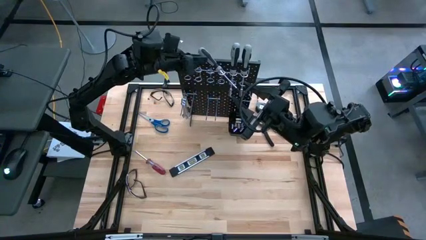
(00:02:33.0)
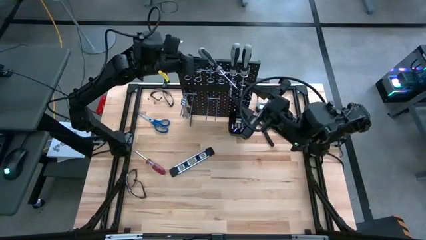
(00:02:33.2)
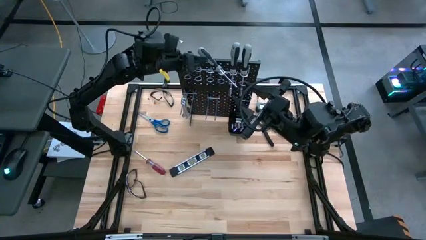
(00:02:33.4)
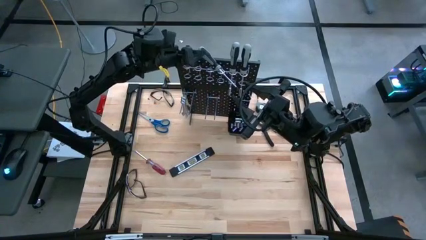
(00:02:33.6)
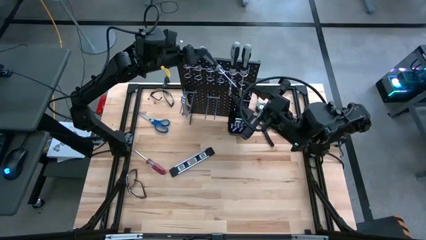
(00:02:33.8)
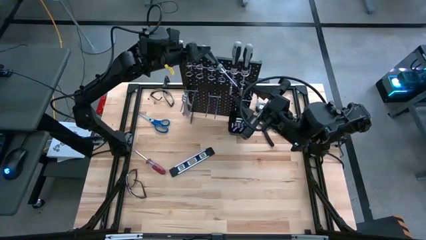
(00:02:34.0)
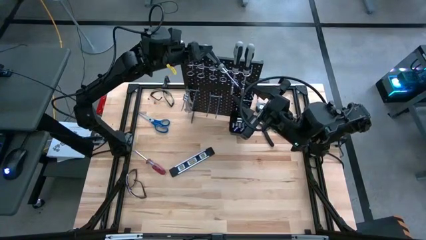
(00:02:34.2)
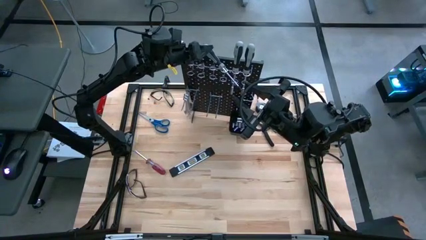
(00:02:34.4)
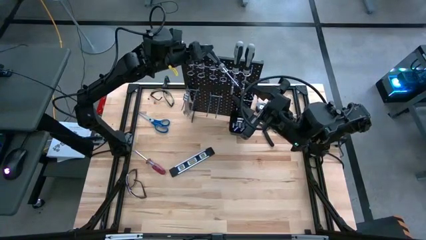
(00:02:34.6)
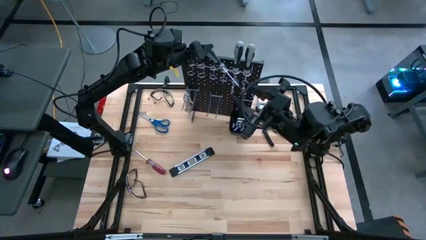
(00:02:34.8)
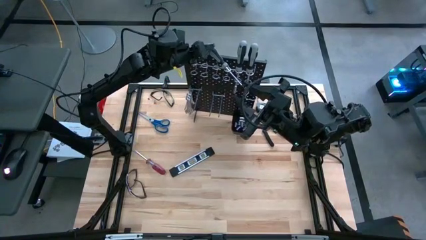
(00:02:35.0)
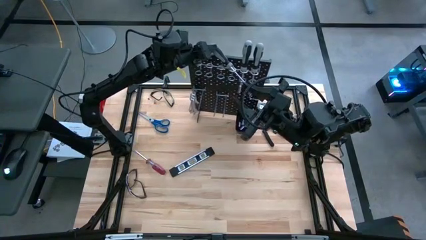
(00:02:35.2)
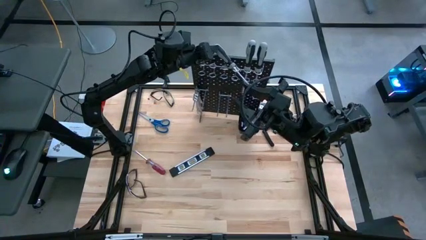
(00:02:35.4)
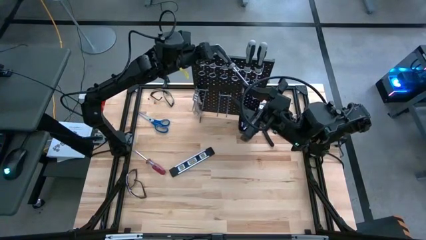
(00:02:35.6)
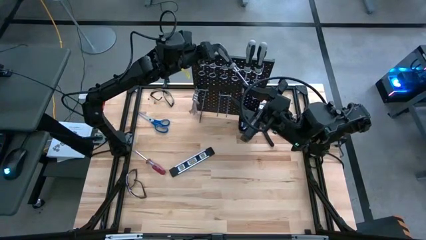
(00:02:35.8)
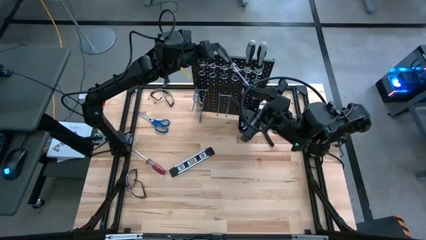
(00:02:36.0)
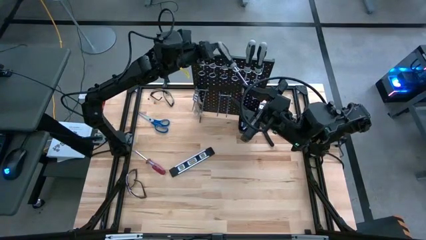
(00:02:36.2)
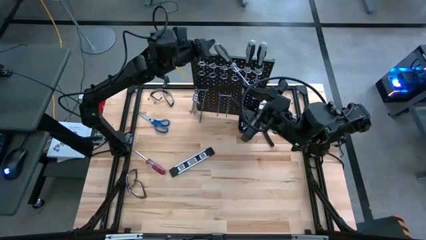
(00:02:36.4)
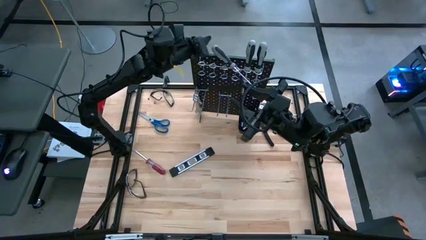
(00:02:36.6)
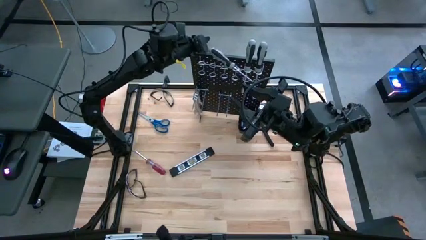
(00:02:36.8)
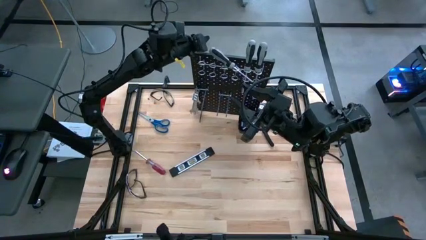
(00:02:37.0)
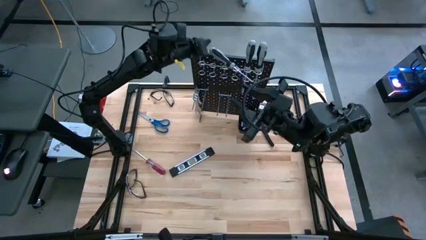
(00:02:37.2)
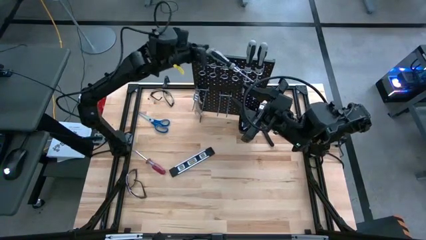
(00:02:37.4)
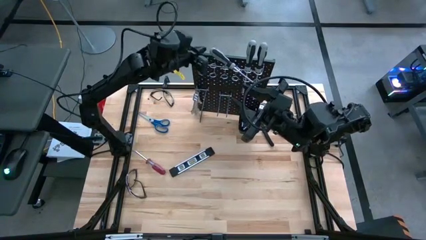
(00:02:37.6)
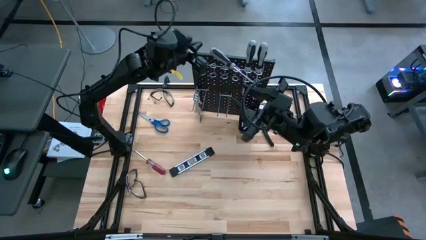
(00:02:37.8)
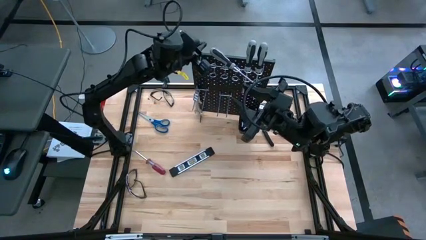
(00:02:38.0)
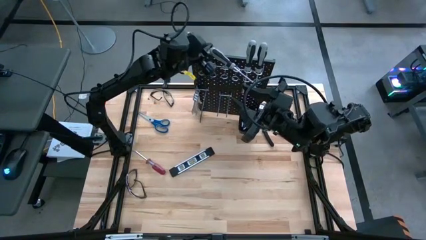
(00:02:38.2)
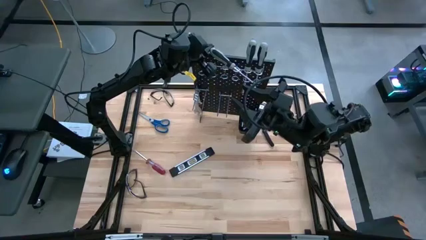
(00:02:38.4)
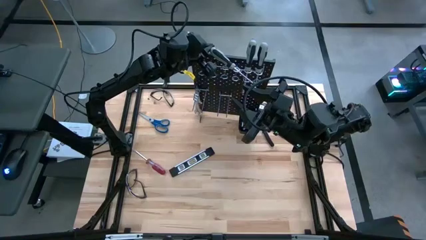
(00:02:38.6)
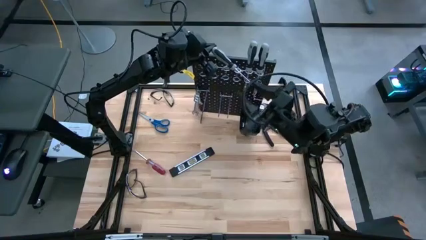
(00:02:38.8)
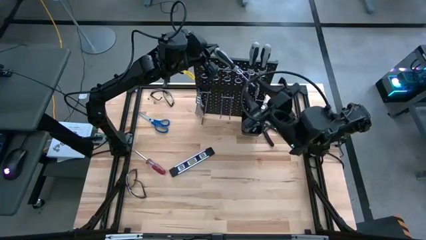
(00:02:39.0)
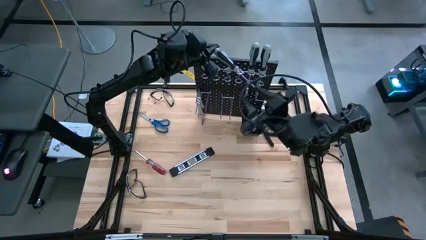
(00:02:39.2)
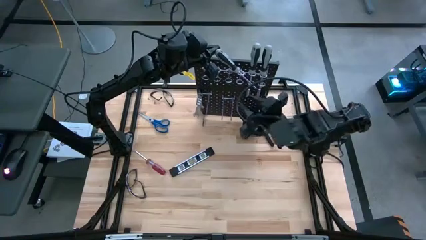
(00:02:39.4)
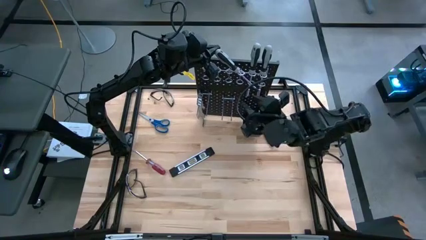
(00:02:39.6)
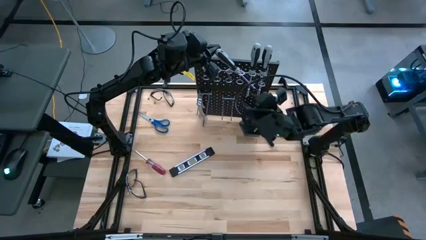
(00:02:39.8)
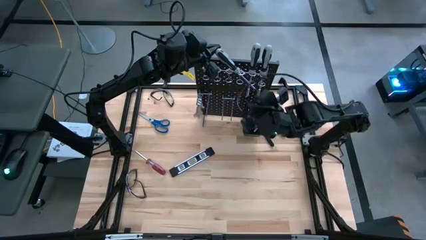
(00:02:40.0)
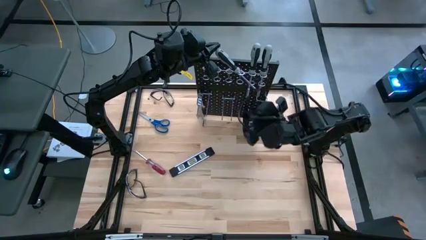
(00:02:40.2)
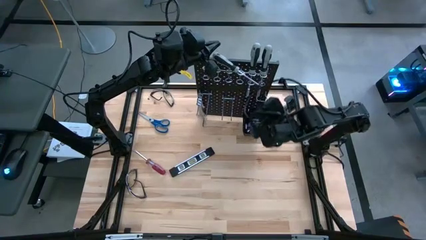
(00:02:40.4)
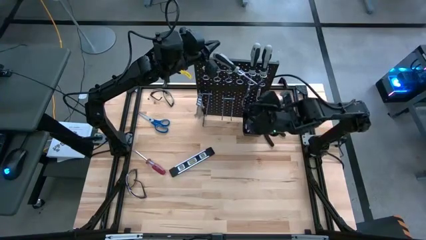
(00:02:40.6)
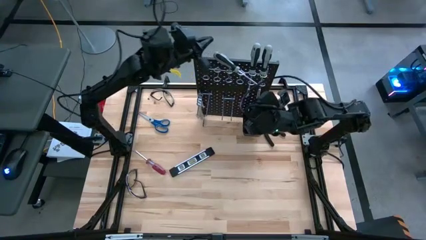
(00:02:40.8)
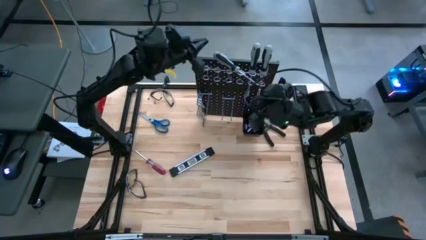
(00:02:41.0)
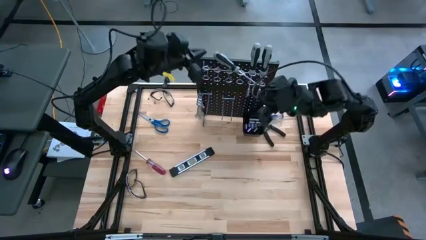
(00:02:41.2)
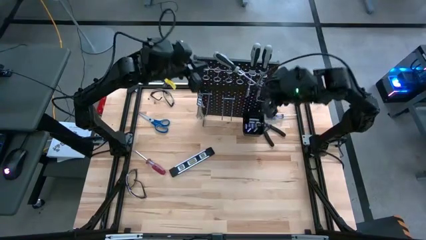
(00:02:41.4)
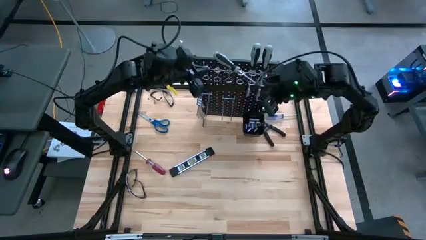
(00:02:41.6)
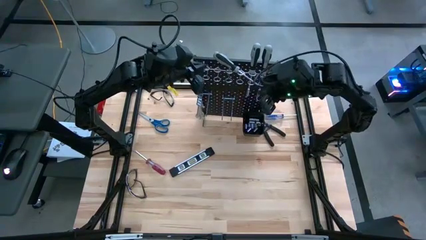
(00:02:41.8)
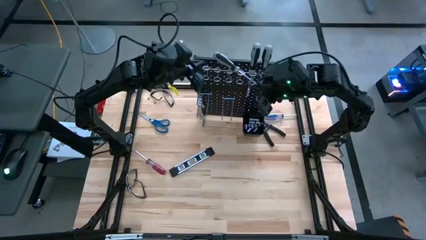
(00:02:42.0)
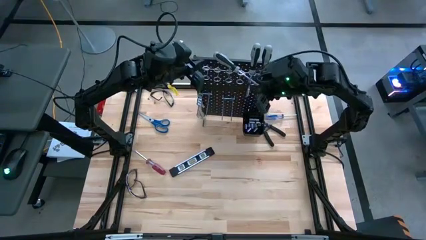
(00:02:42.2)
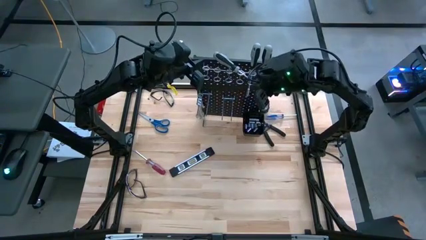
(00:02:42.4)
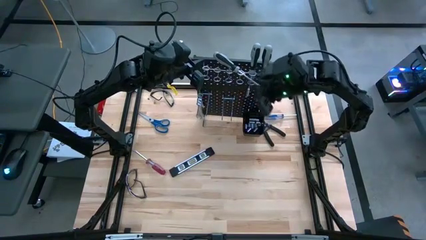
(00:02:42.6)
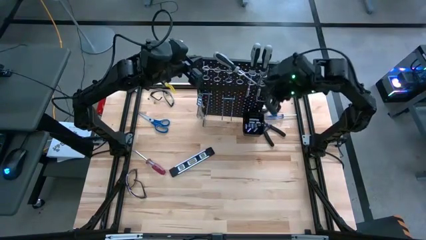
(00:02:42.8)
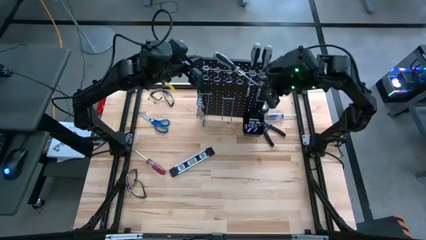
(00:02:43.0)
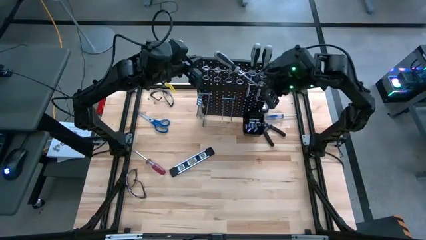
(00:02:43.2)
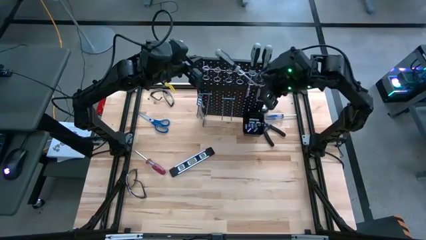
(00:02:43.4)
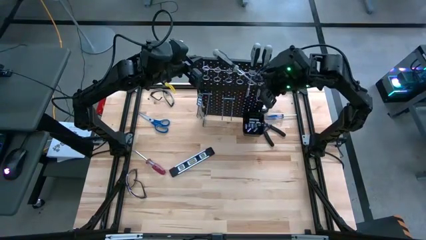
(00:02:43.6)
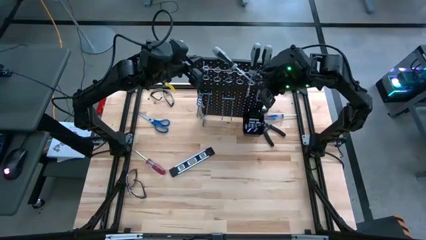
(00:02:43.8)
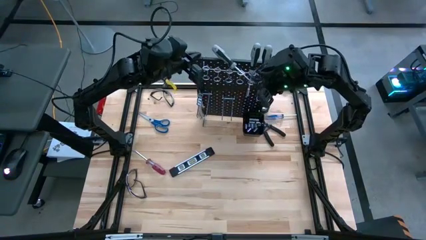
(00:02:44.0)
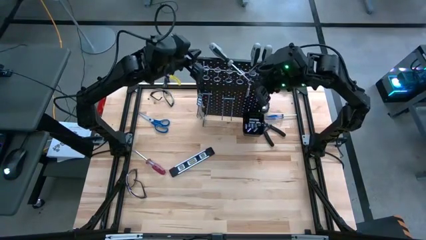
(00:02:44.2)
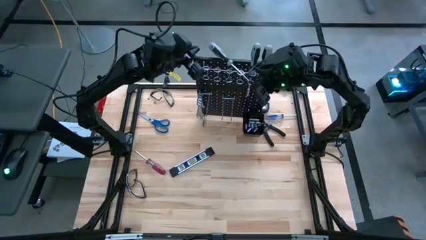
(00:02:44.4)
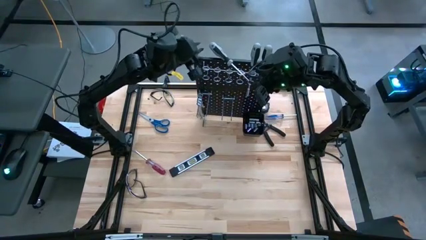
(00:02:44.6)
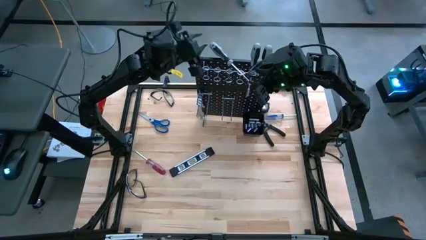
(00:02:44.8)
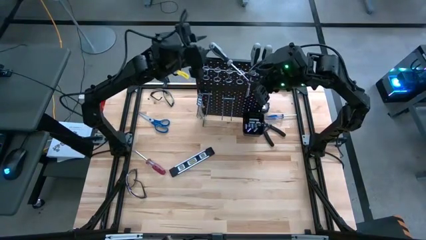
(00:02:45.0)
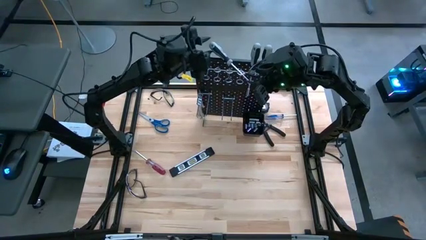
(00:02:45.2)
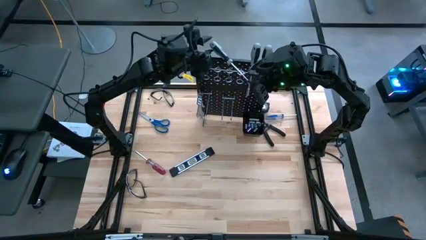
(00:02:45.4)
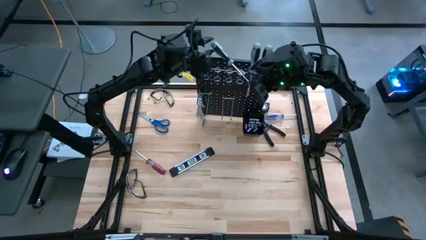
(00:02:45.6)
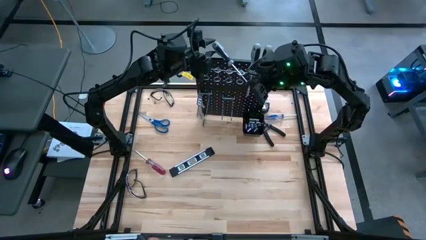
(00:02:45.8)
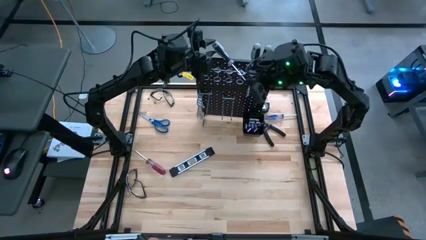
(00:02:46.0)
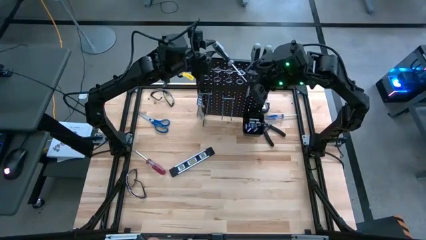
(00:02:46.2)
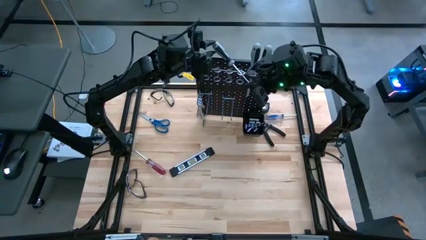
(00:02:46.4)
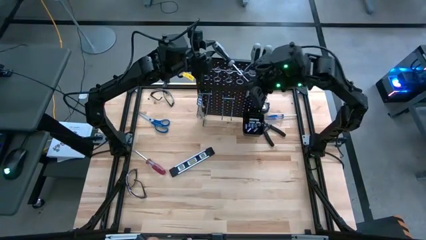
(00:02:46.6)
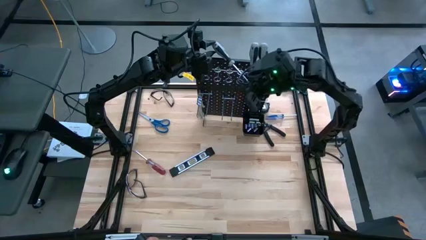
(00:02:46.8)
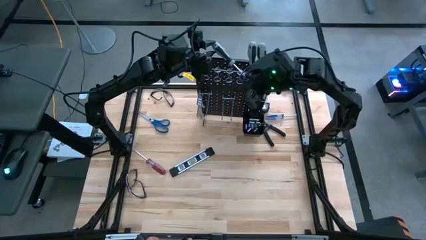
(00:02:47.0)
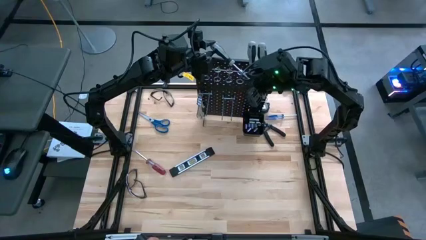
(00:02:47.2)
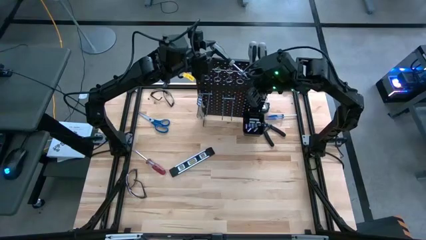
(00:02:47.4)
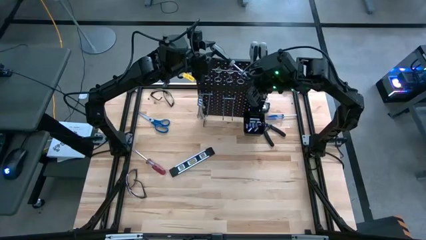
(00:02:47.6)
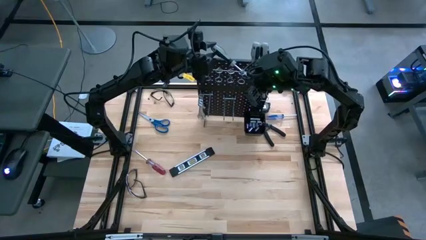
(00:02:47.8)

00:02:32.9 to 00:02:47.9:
Task: Hang tools onto peg board
Hang the gray screwdriver on the pegboard

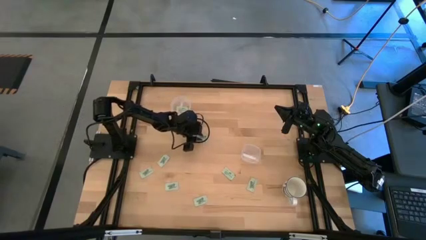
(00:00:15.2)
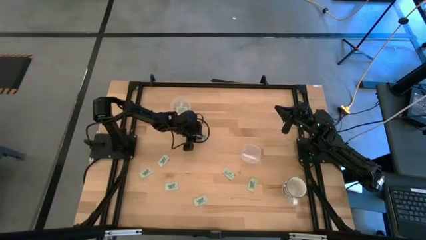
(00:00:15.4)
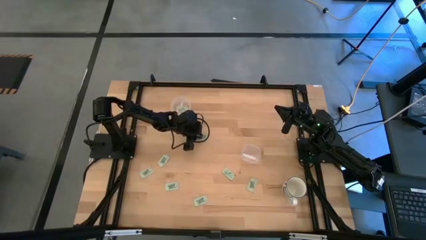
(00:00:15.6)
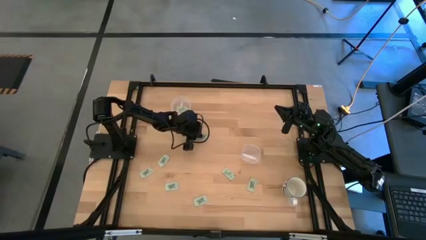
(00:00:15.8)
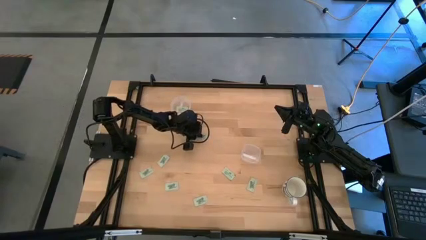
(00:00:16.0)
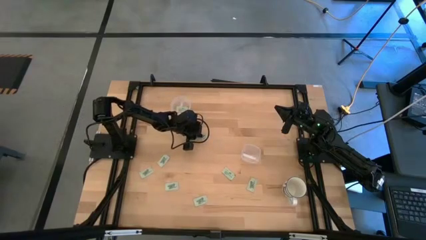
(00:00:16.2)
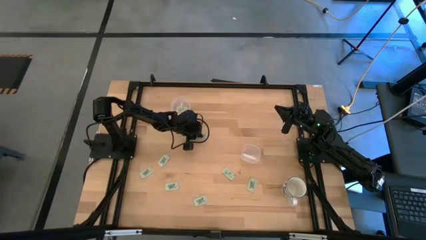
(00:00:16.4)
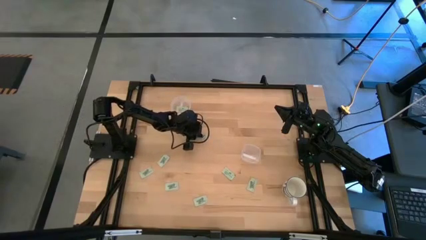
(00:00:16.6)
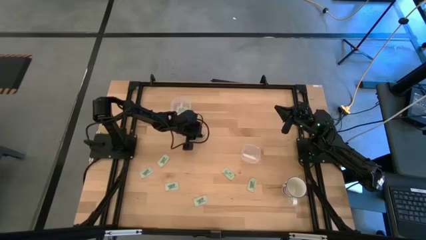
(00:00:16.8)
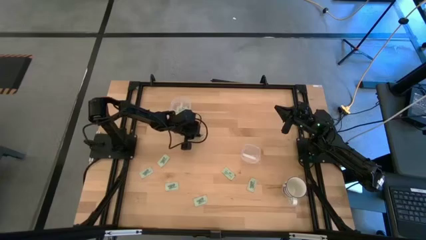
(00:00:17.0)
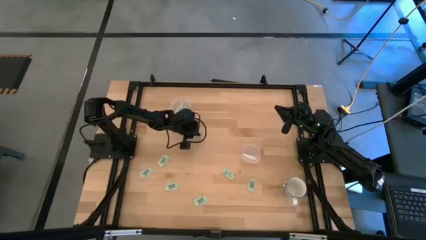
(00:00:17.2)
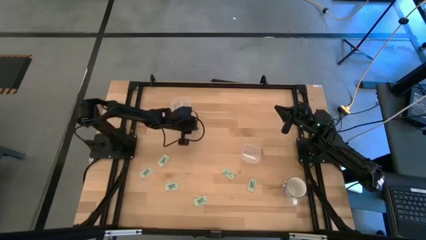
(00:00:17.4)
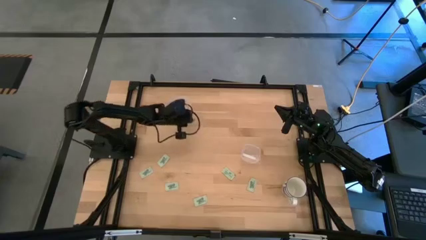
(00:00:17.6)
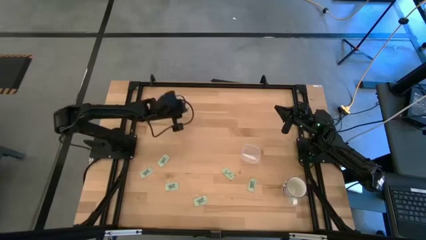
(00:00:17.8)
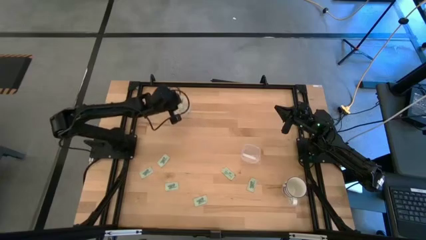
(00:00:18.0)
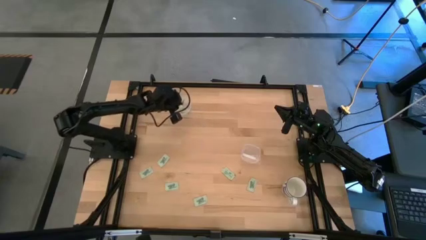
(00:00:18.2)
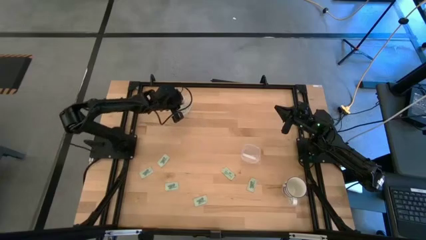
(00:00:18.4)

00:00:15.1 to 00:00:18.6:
Task: Pick and place Stevia / Truvia into bins
Put the stevia packet into the top transparent container
